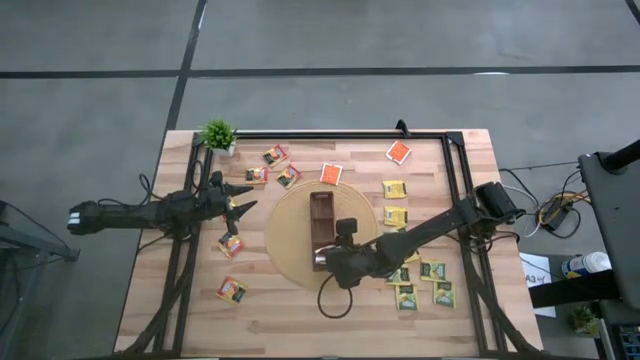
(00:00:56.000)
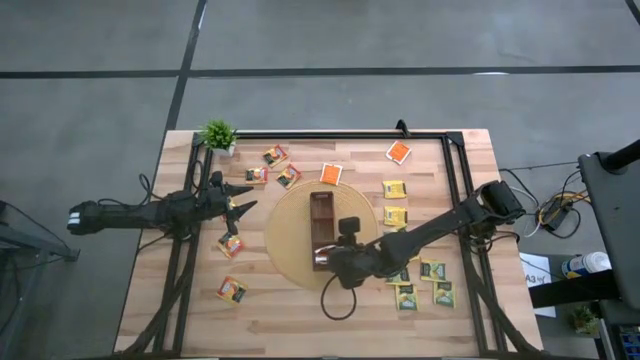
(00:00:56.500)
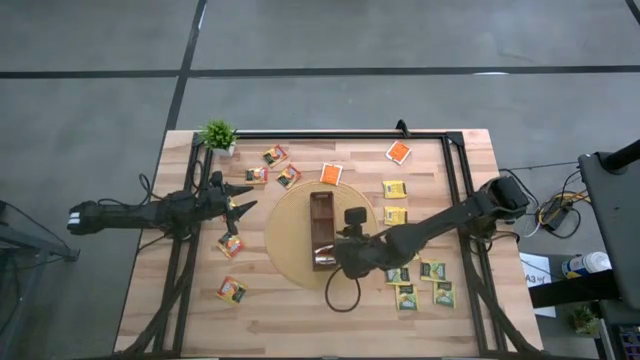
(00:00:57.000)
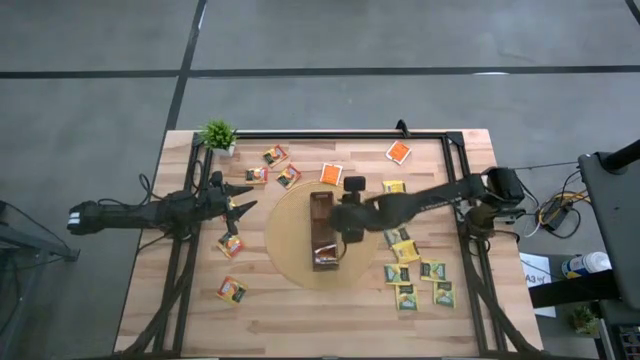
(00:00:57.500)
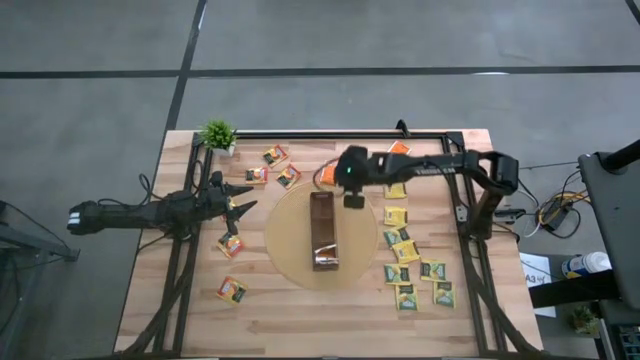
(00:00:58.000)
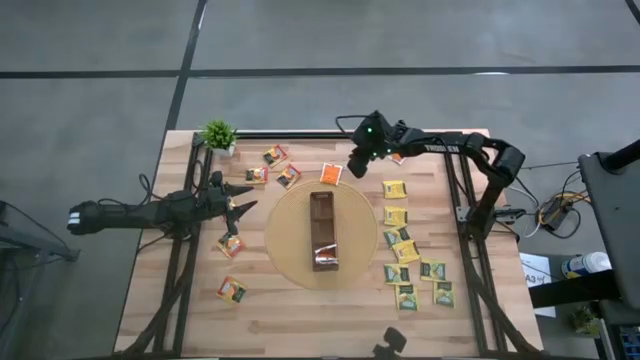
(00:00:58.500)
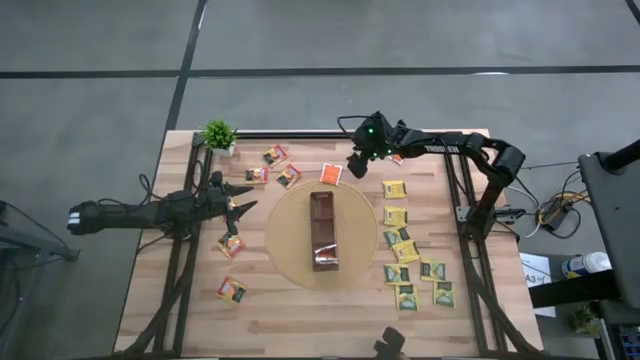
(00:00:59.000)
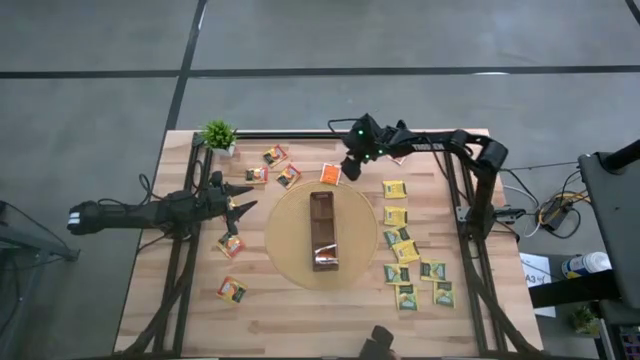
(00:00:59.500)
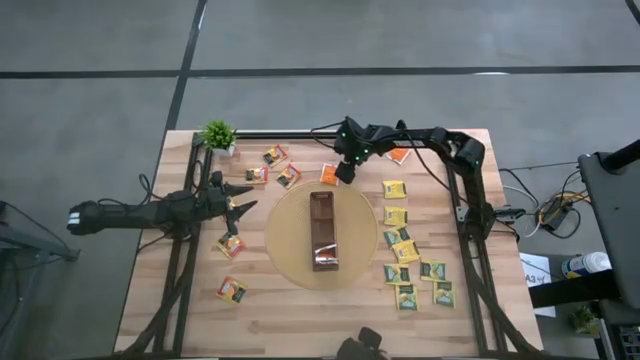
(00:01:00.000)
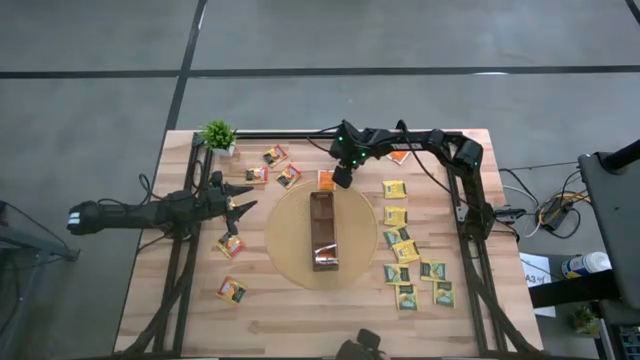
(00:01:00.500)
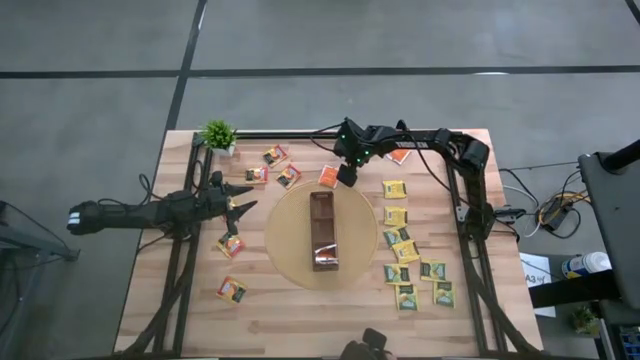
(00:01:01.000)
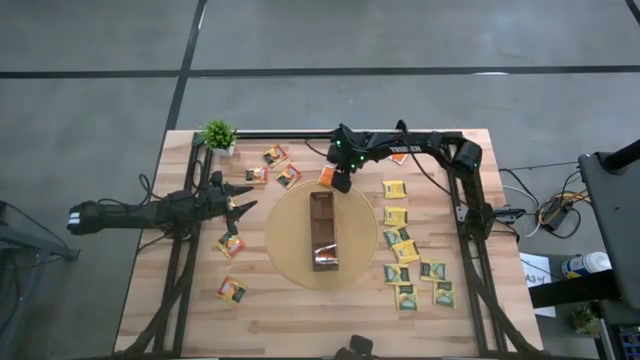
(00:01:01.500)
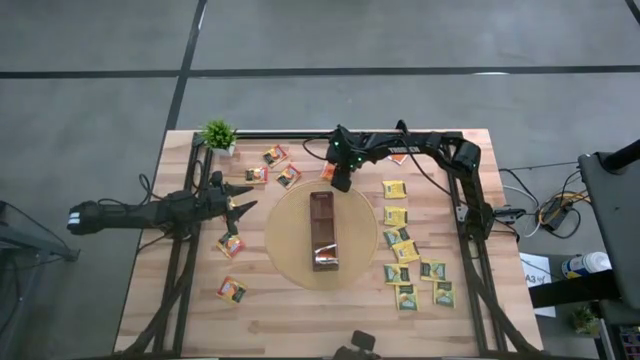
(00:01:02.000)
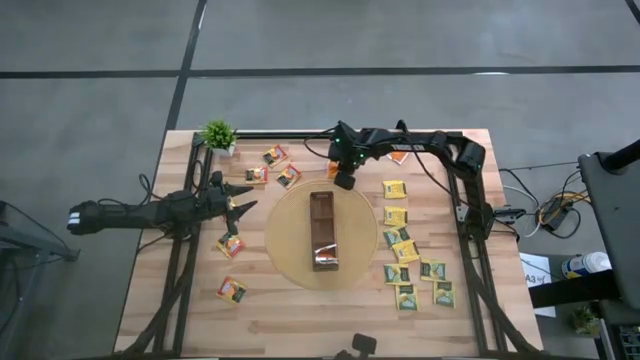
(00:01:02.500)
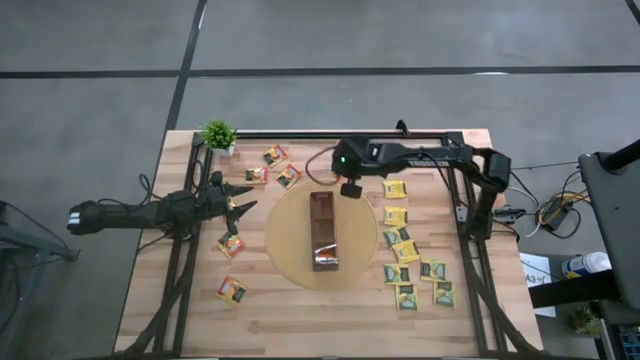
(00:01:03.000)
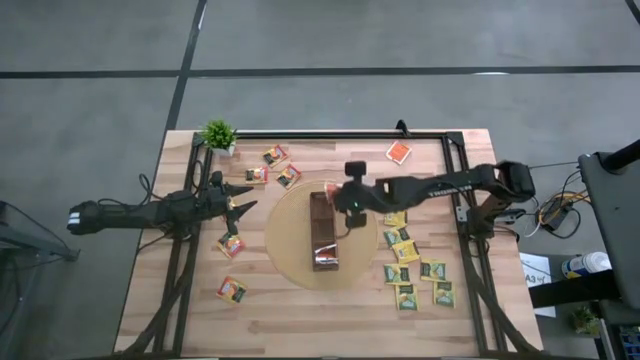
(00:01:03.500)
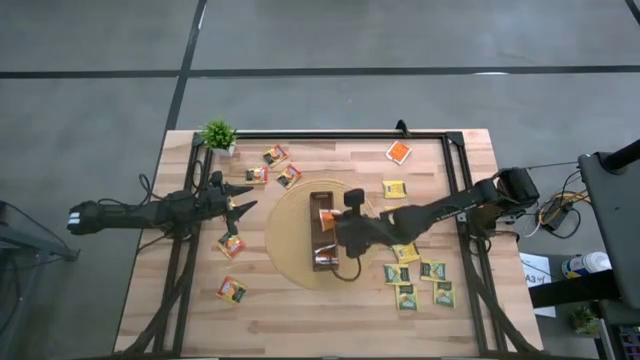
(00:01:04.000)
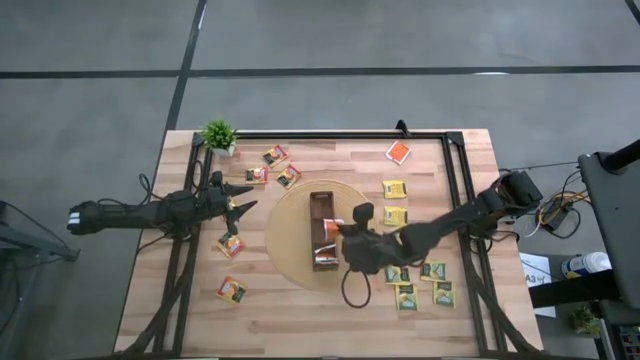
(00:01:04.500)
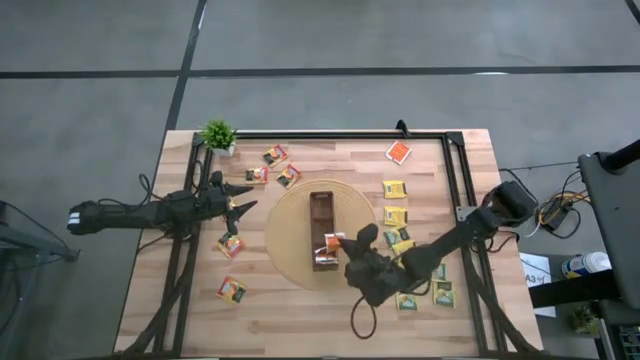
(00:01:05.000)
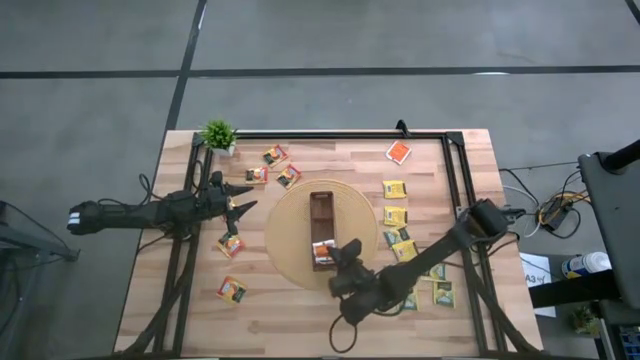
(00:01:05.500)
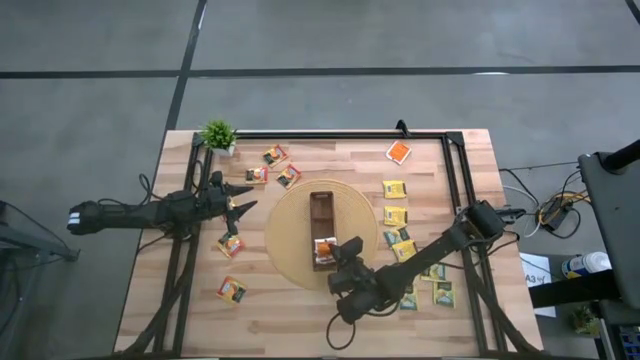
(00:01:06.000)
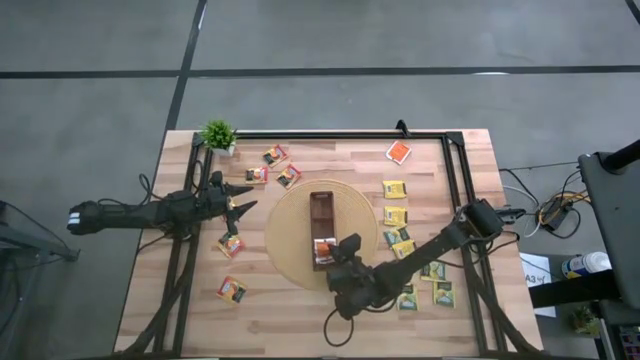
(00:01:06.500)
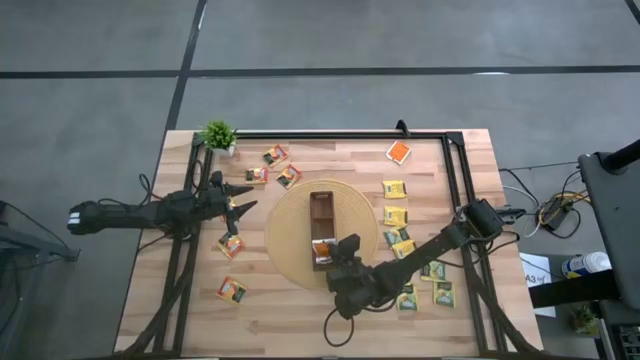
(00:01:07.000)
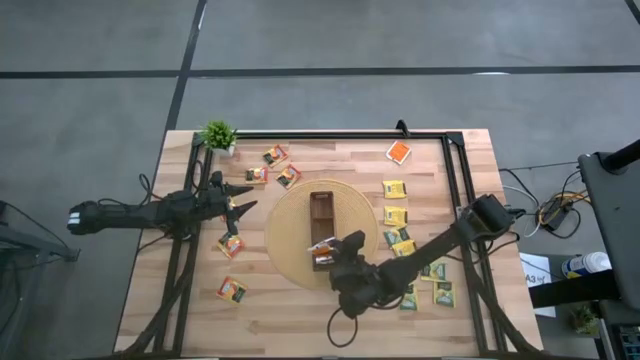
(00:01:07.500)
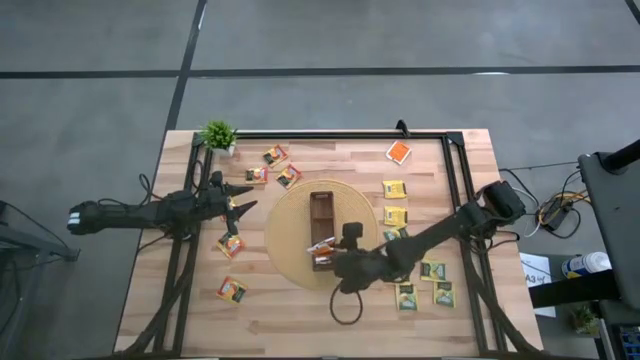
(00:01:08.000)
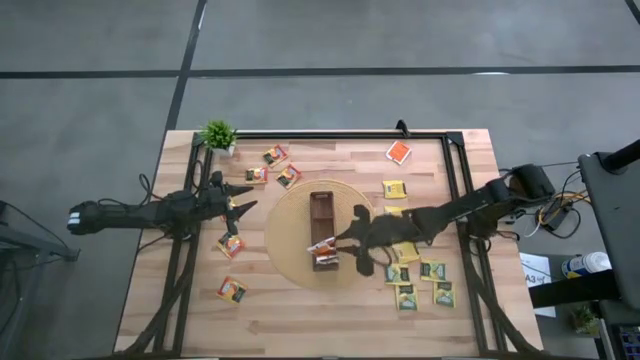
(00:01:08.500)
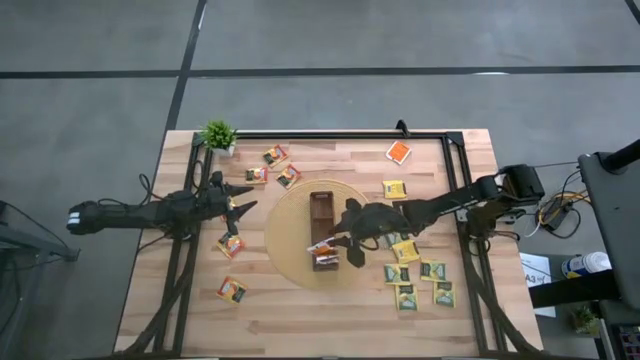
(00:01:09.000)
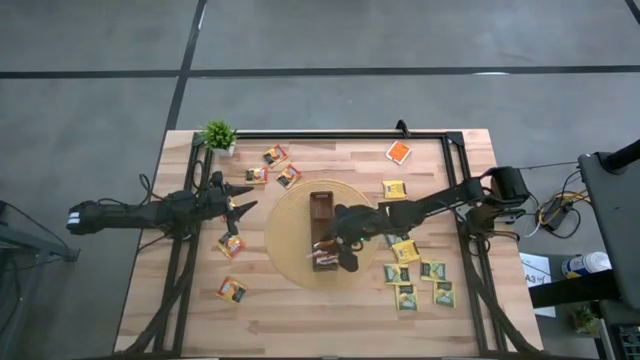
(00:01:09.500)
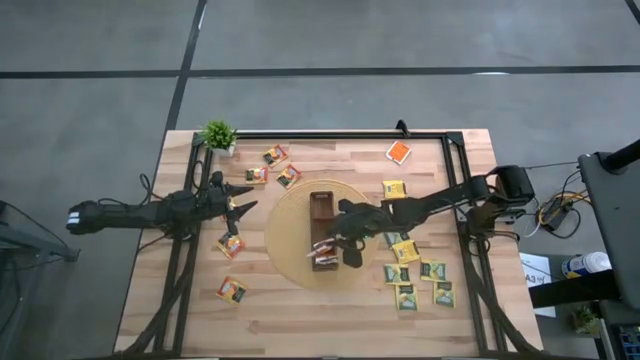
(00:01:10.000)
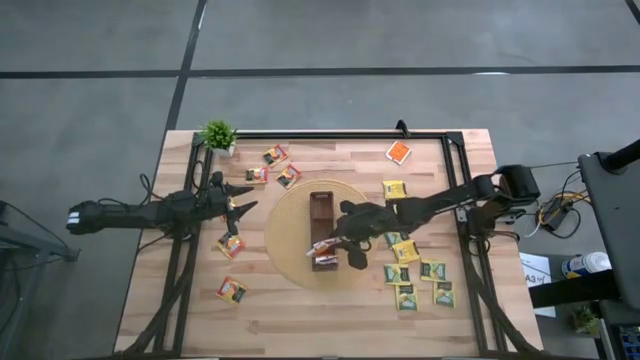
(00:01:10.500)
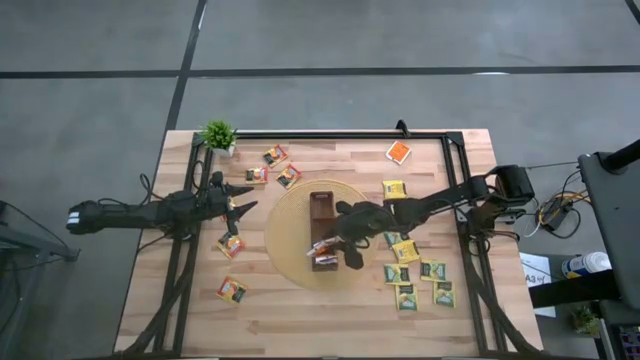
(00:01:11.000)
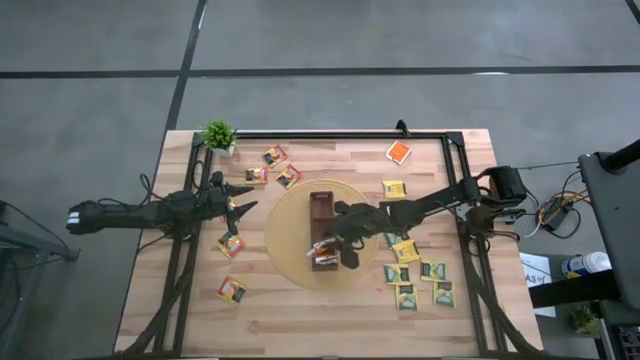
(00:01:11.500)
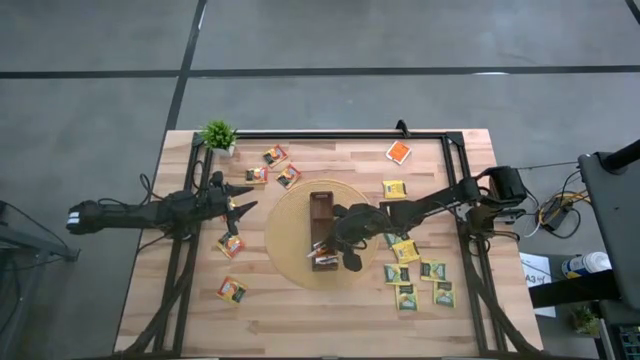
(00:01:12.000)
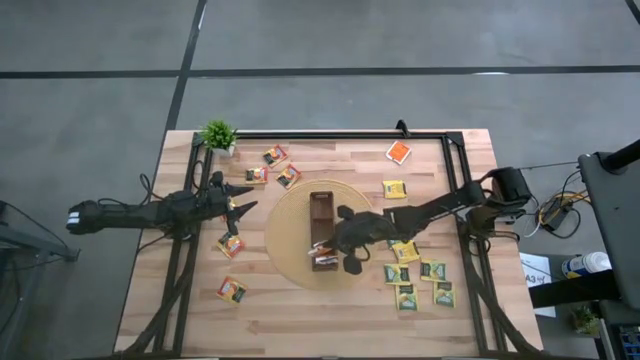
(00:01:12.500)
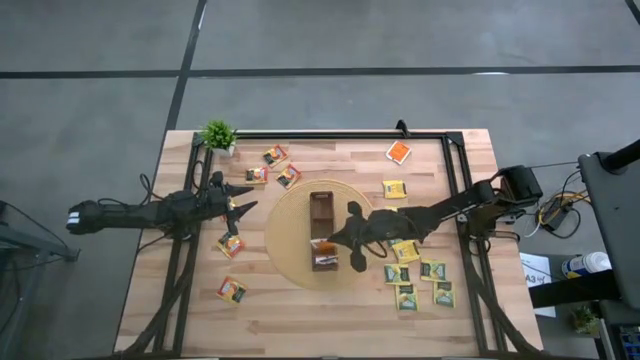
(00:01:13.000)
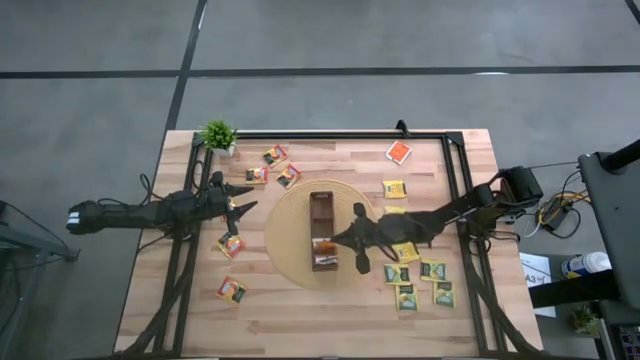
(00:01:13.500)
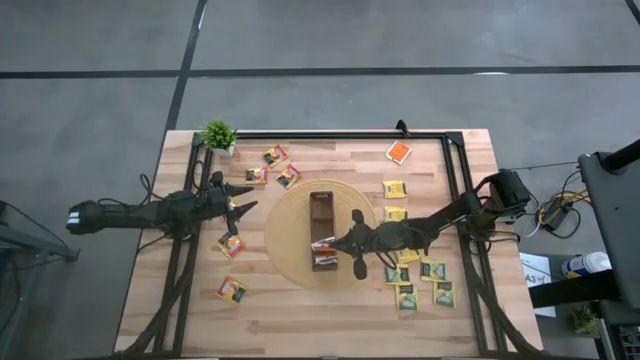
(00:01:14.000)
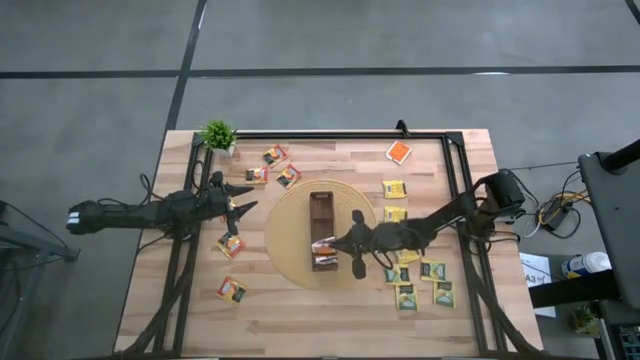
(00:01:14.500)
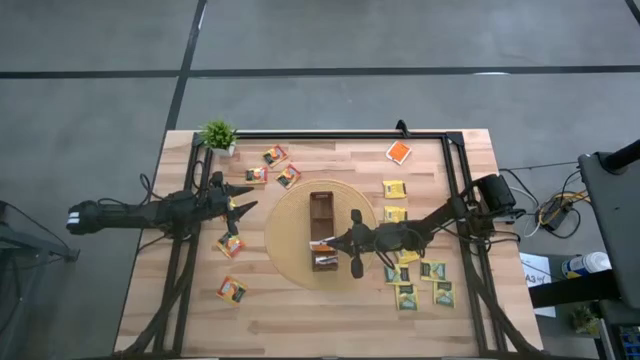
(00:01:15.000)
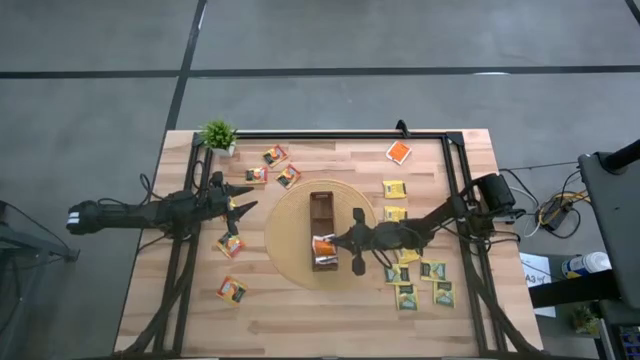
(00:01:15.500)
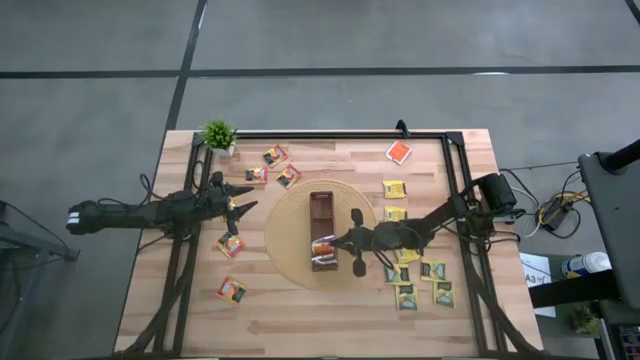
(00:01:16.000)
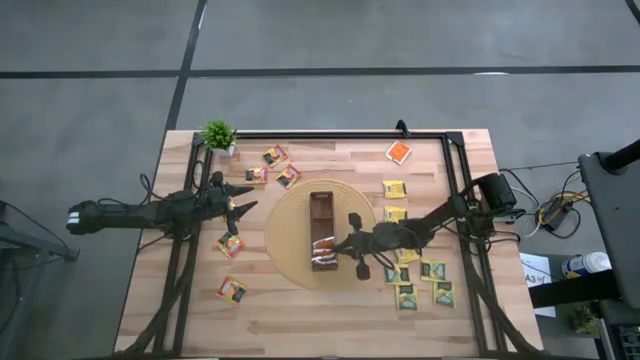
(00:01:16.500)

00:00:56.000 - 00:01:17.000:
Task: Pick & Place Tea
Put the left white tea bag into the bottom section of the wooden organizer

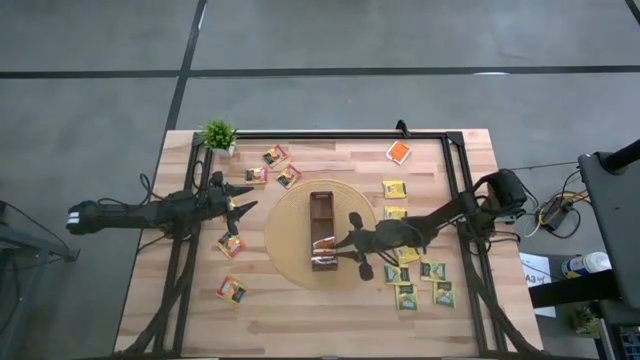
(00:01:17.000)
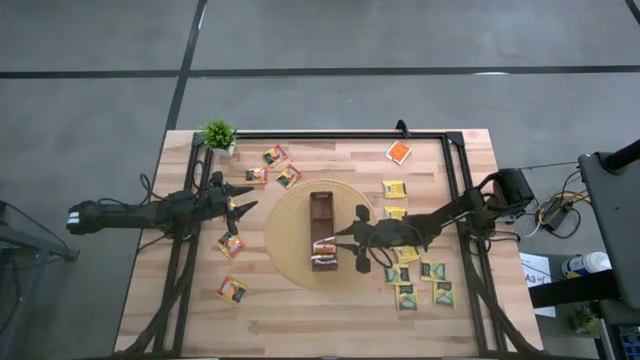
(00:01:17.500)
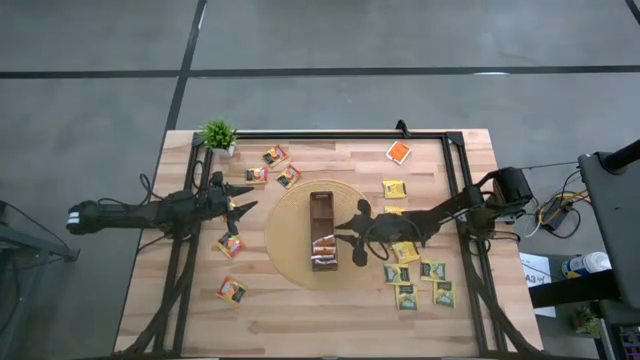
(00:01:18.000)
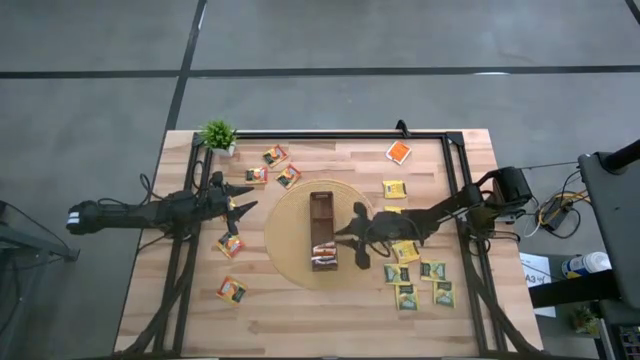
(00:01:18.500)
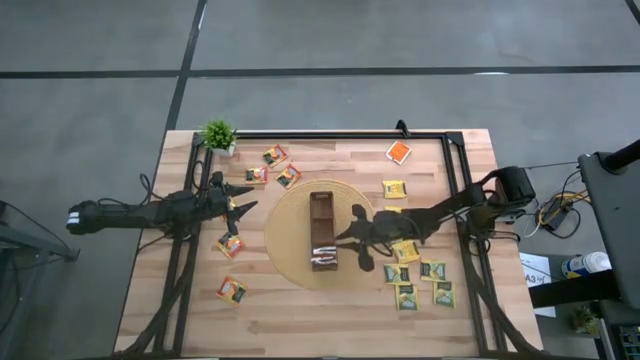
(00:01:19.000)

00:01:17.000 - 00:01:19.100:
Adjust the white tea bag in the wooden organizer
